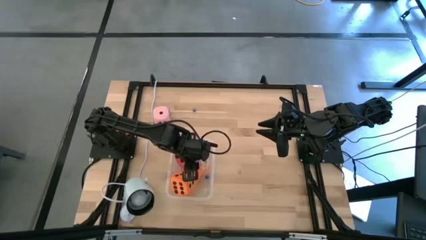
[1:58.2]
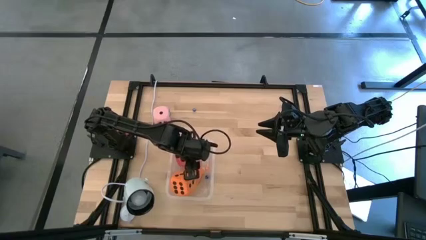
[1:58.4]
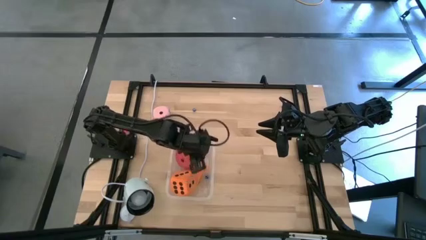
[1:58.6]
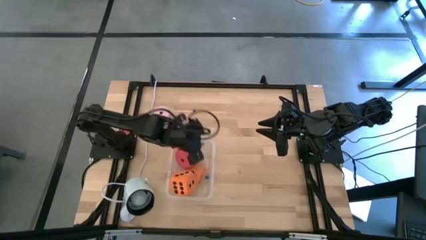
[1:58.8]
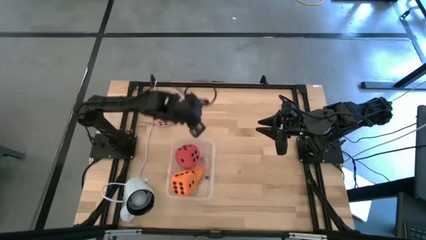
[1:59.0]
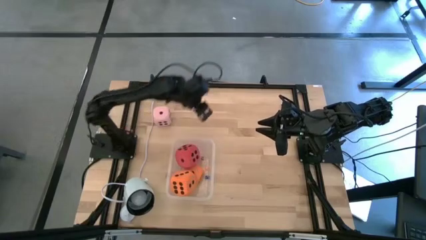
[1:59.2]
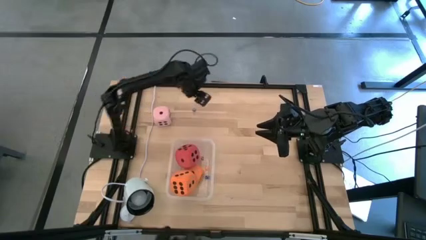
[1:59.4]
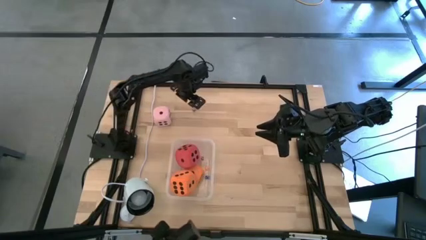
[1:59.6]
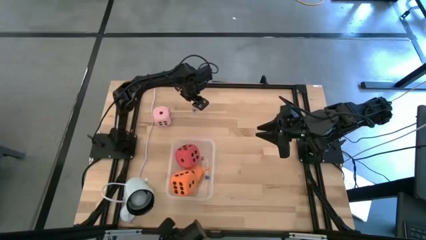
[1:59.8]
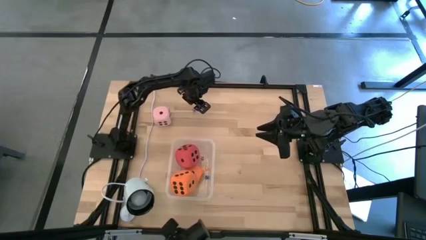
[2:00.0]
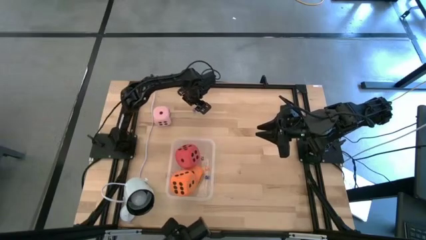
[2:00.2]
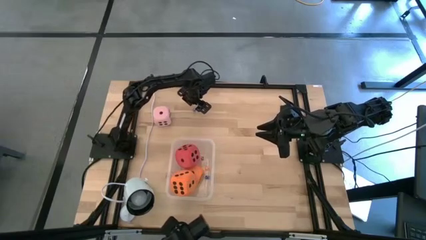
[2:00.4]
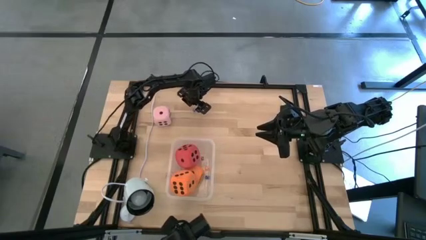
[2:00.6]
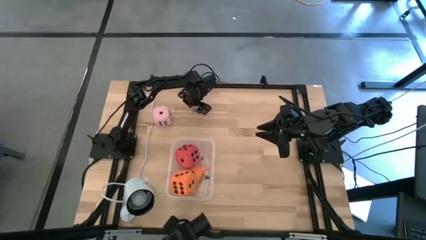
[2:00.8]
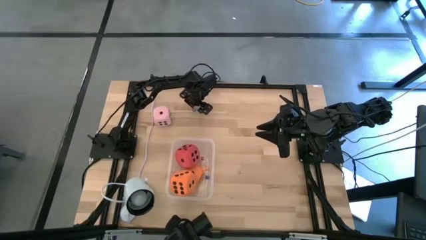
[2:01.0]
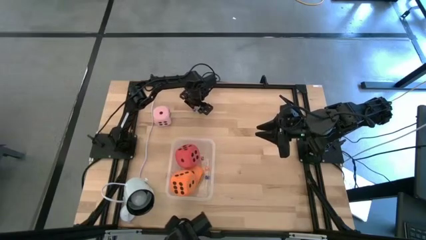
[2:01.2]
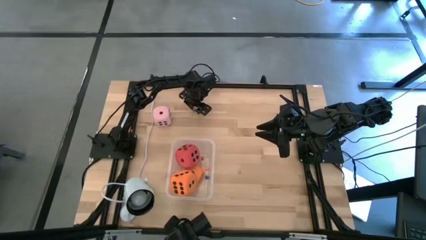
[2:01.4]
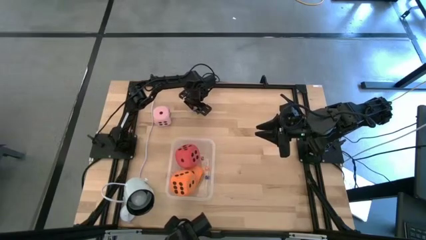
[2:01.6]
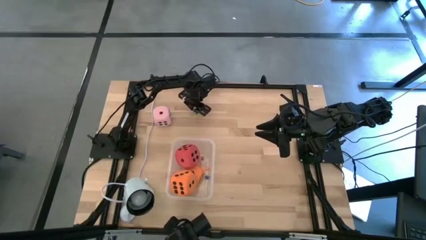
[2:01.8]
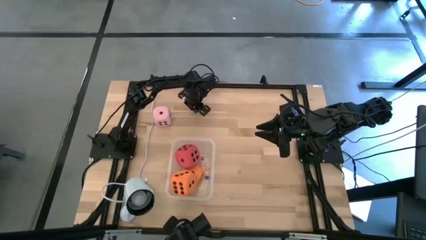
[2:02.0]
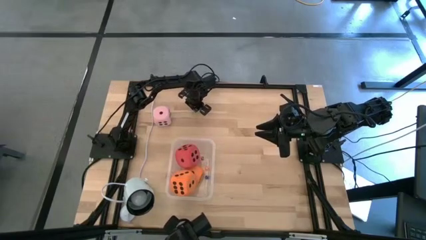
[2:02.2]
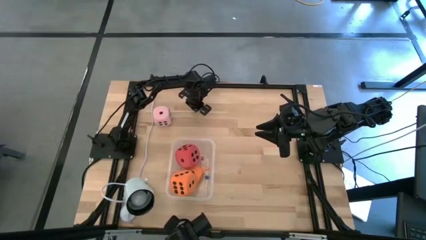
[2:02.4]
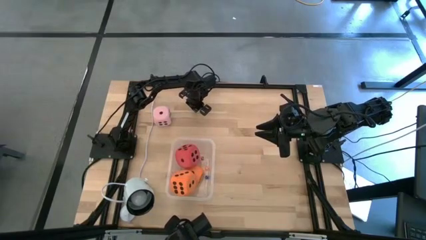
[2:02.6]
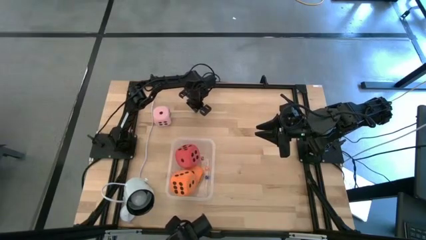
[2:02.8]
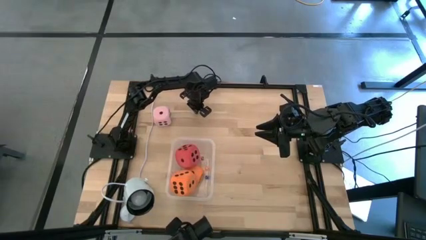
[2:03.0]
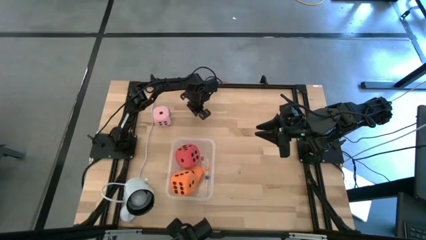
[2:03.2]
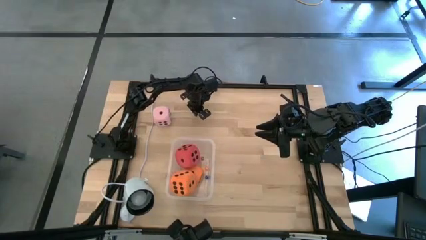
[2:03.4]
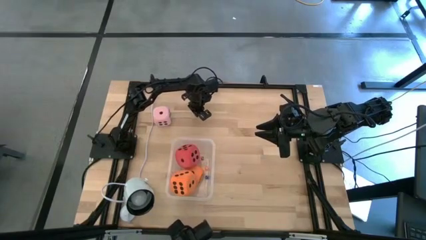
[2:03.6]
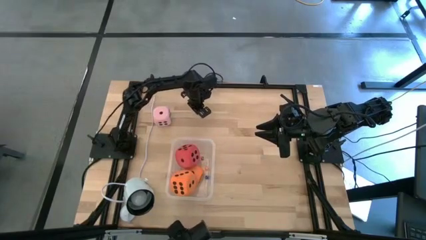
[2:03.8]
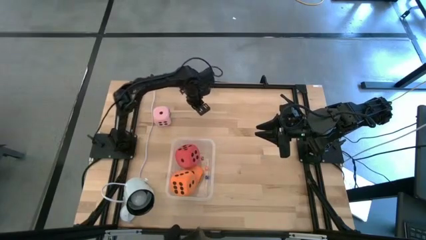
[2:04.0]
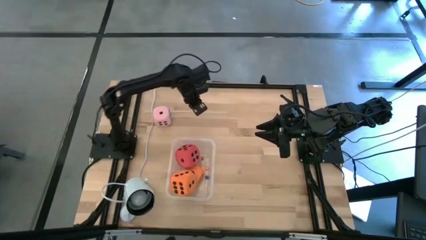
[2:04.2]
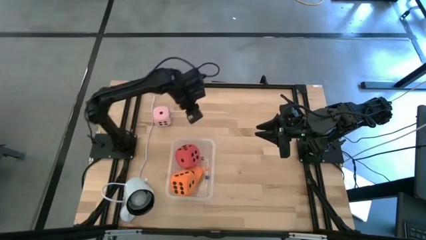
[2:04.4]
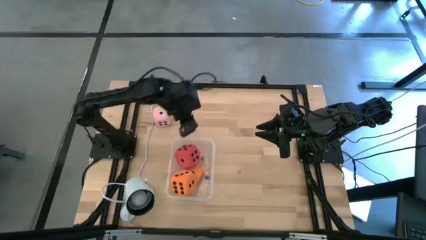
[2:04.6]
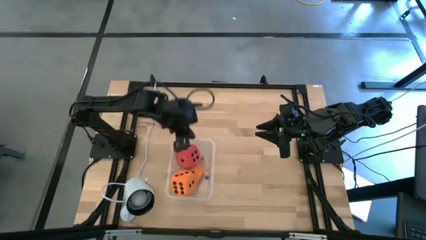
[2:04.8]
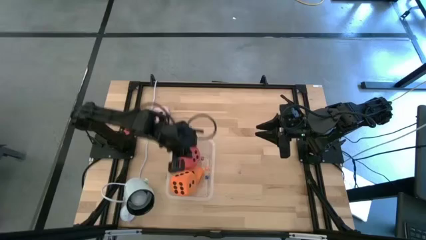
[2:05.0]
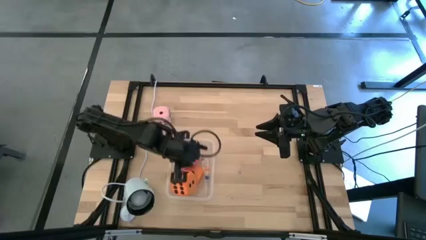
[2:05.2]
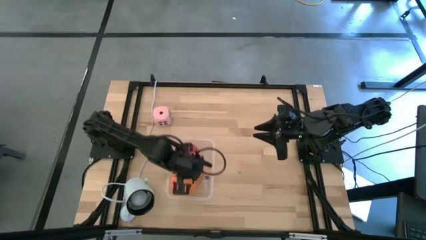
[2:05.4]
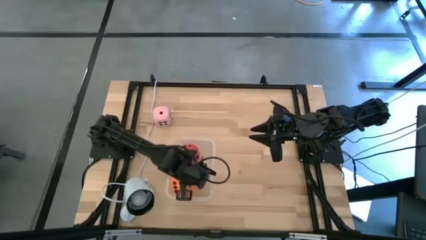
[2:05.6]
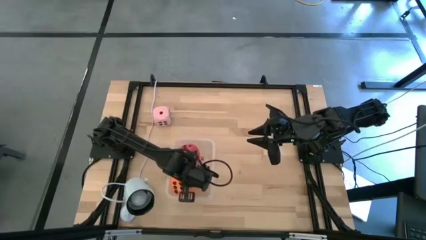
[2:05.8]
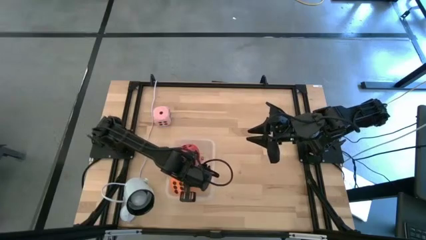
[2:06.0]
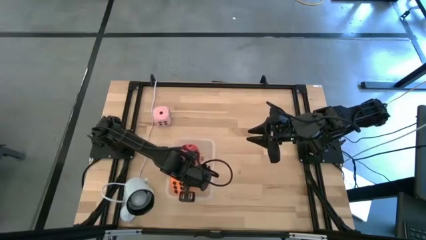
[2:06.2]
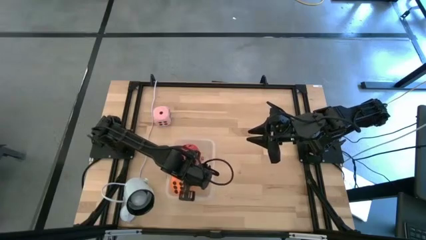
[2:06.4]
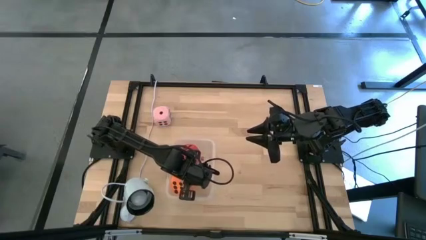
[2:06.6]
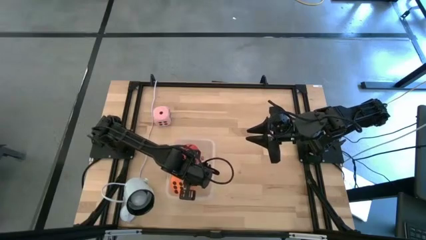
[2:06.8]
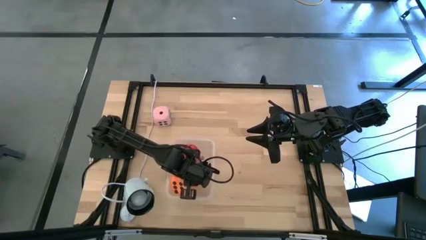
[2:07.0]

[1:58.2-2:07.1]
Task: Pick & Place Dice
Put the small dark blue die on the bin

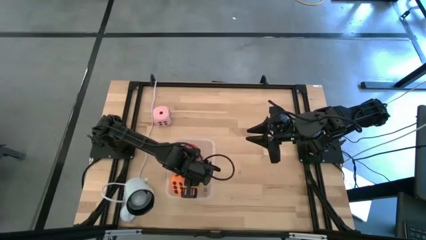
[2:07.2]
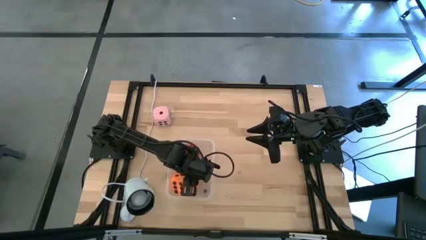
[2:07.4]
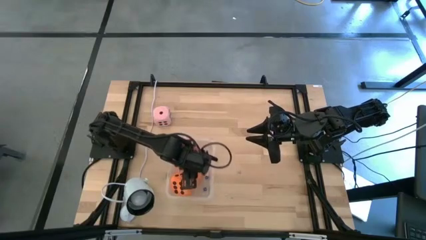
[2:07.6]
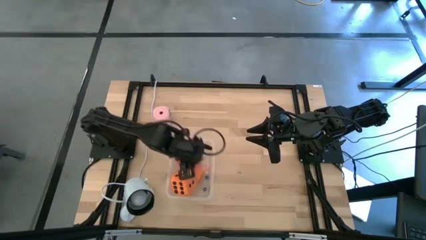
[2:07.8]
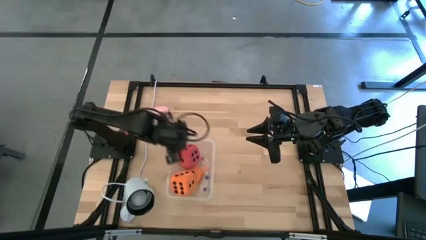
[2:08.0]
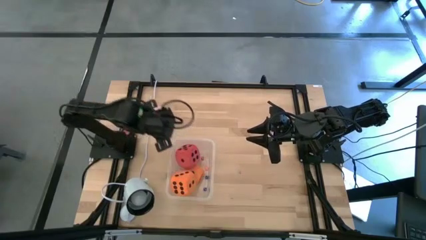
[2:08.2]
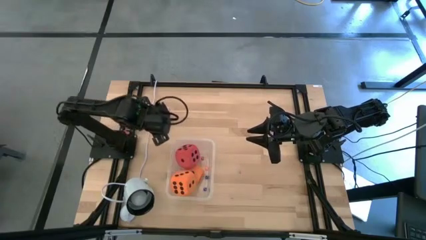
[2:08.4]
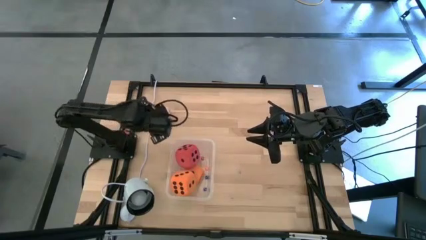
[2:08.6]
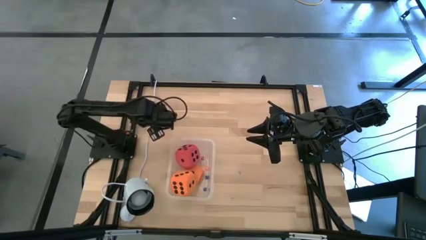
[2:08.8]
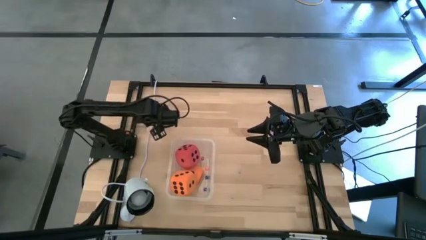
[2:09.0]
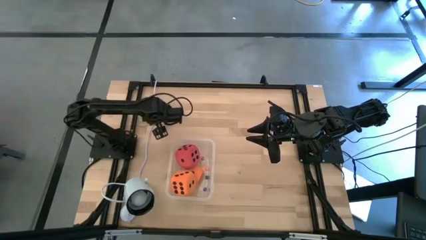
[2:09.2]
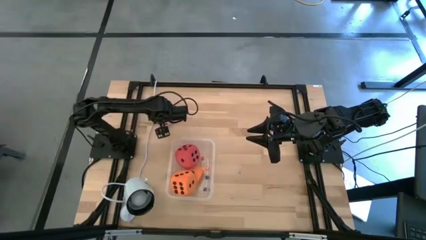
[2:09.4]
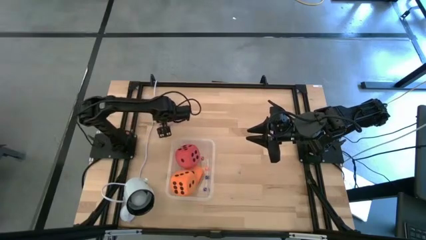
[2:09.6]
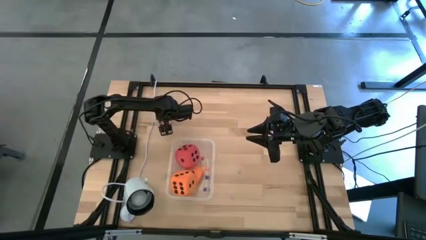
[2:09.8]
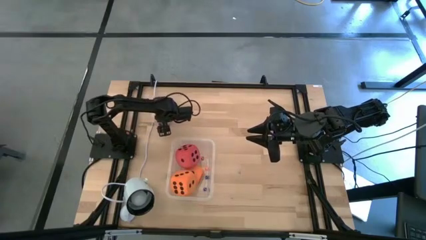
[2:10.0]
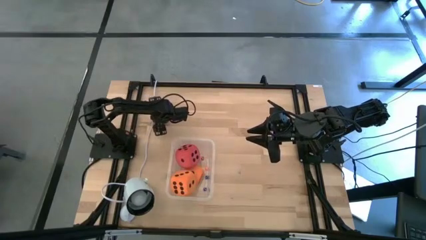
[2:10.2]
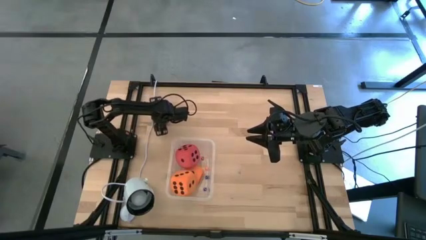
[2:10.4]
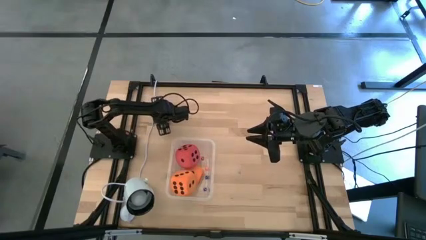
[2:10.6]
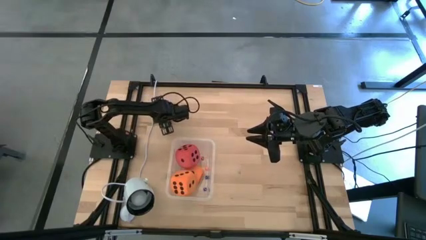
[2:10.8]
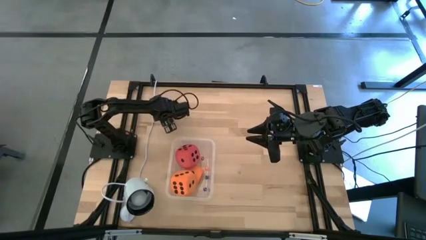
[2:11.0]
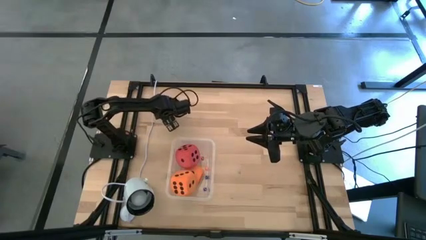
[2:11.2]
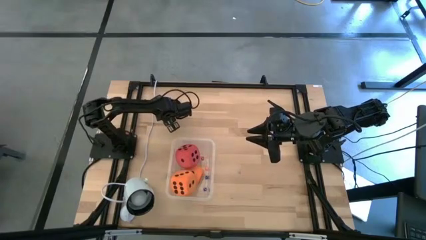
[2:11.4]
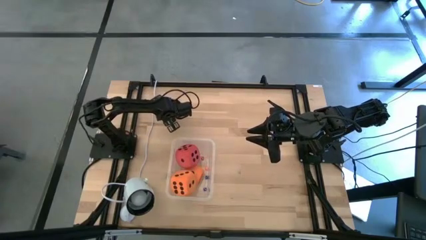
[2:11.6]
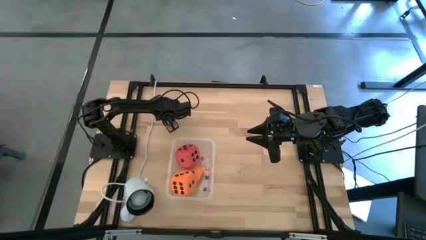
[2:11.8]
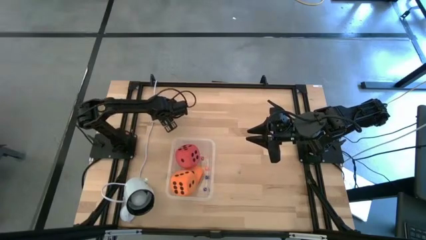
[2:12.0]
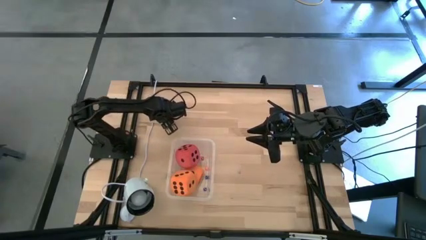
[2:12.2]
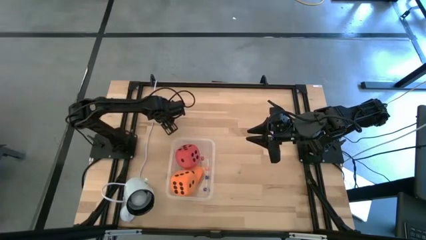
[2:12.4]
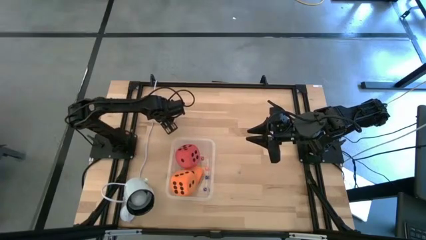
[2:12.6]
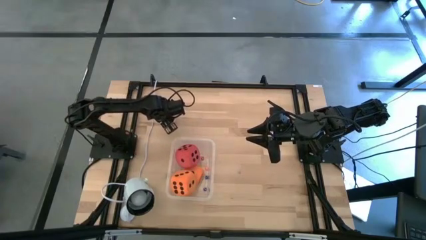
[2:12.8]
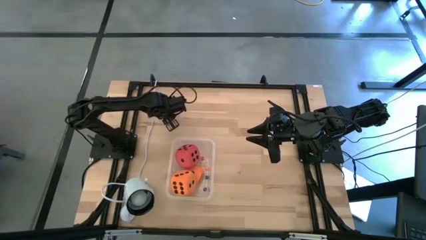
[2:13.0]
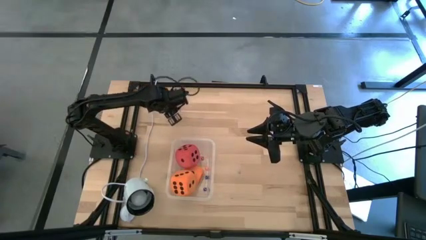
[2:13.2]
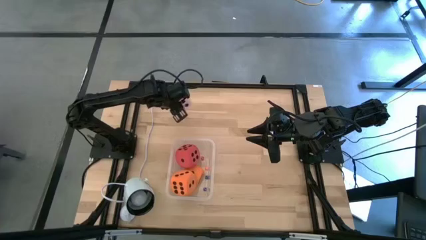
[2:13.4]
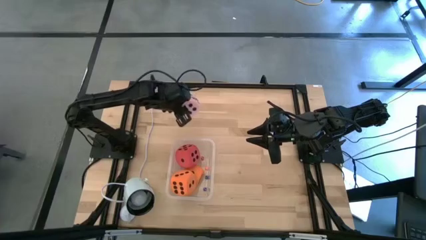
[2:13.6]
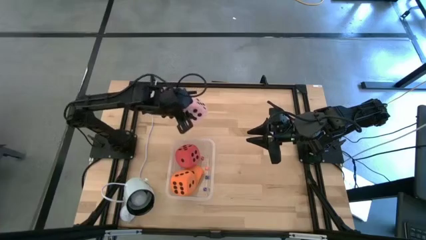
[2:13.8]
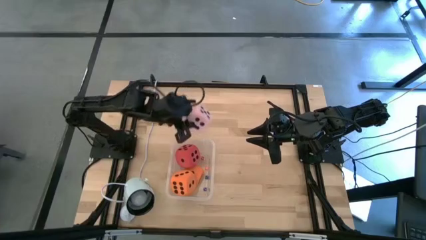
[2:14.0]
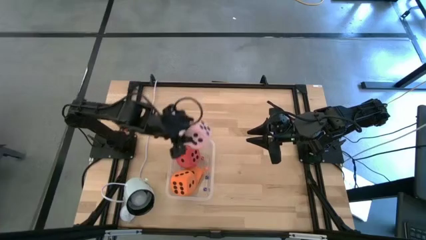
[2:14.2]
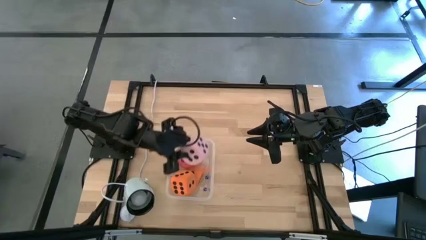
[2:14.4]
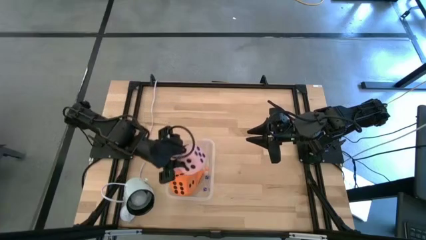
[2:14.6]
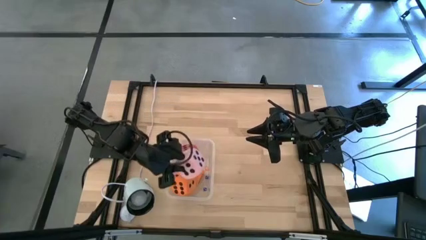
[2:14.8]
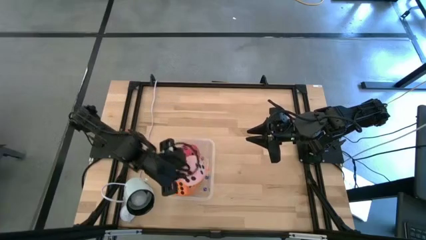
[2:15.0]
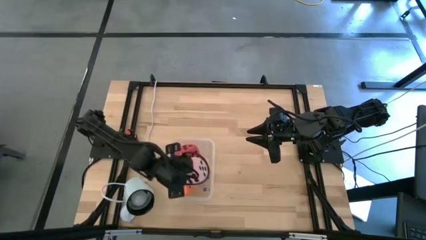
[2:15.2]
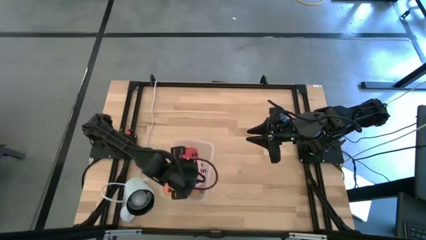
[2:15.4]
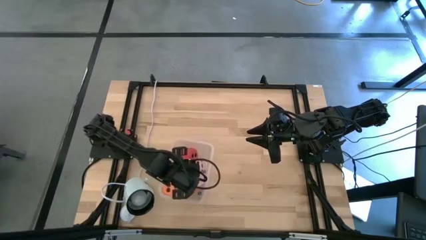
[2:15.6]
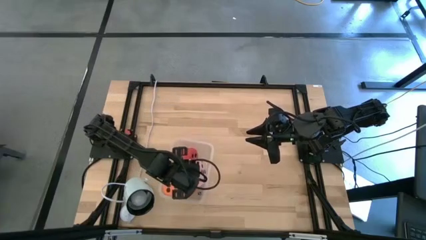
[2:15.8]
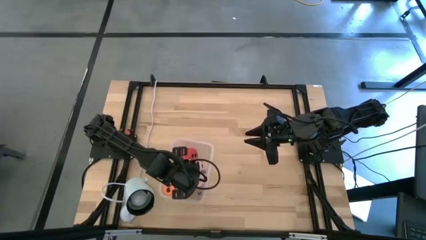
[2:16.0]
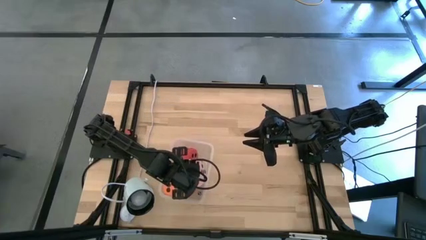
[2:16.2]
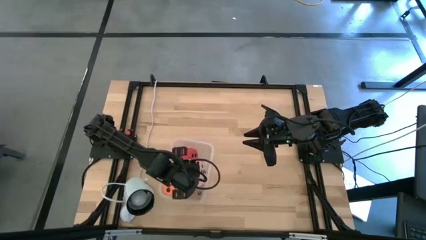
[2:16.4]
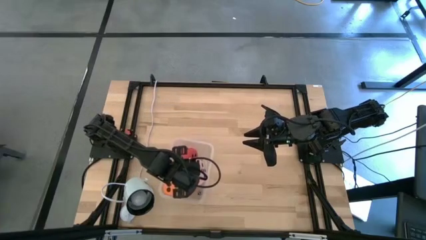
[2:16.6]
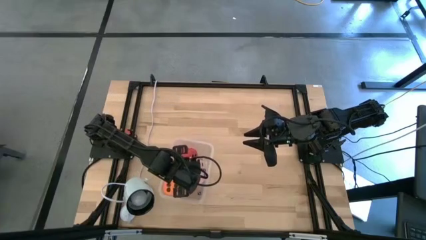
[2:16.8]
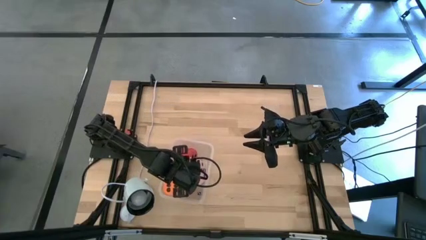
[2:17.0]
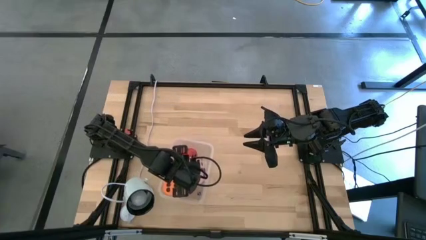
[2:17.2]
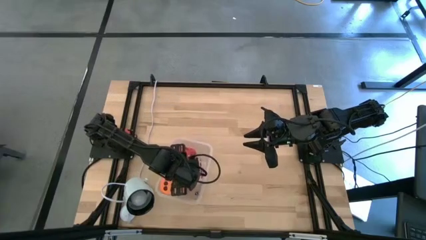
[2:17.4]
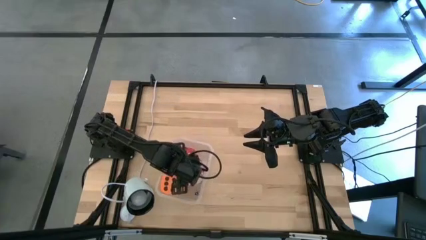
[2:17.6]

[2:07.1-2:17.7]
Put the large pink die on the bin
